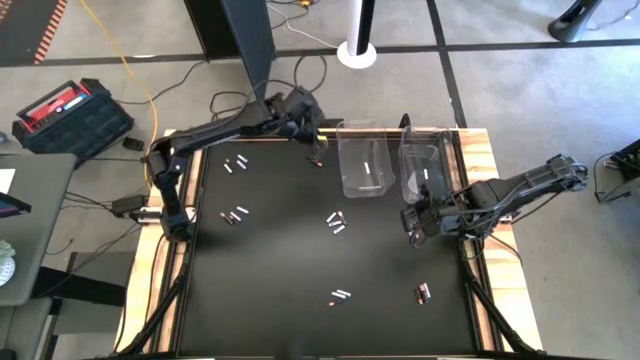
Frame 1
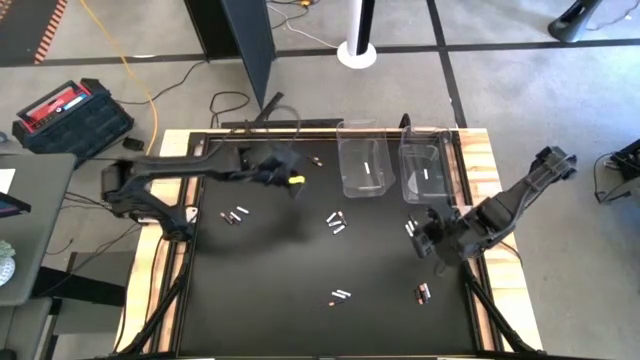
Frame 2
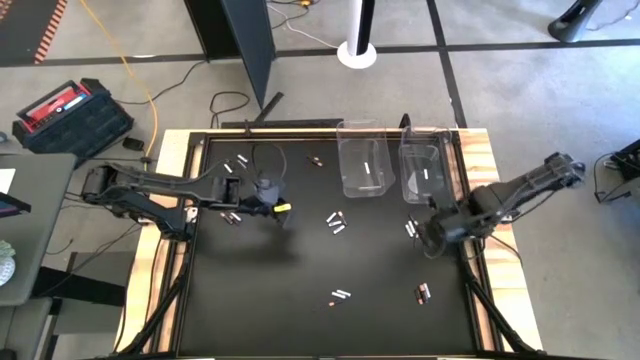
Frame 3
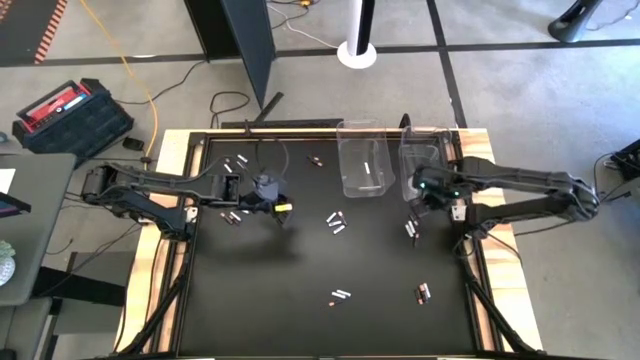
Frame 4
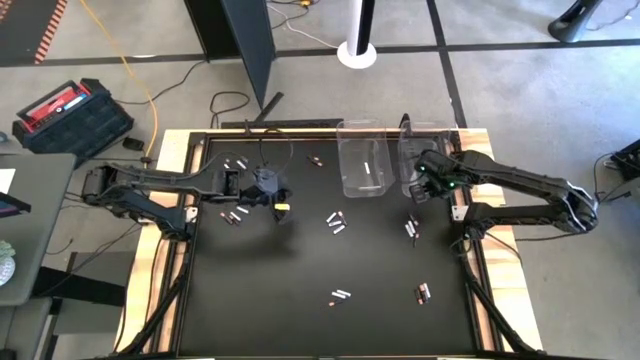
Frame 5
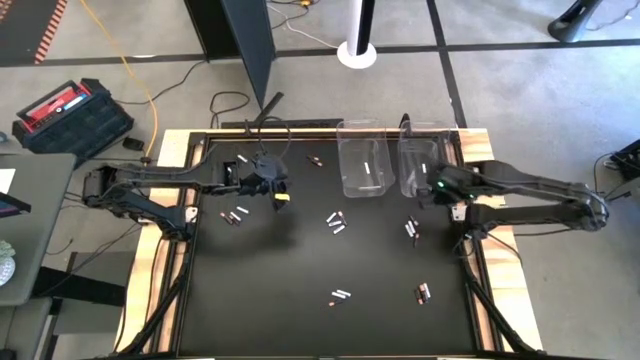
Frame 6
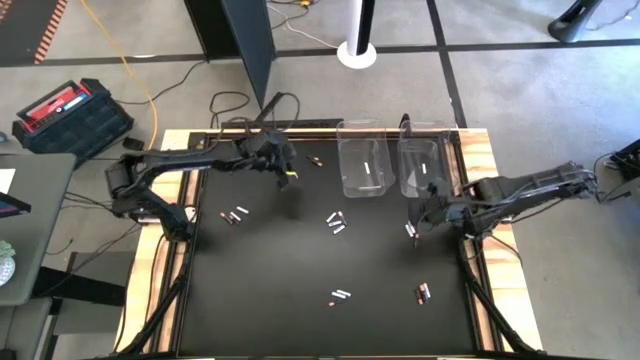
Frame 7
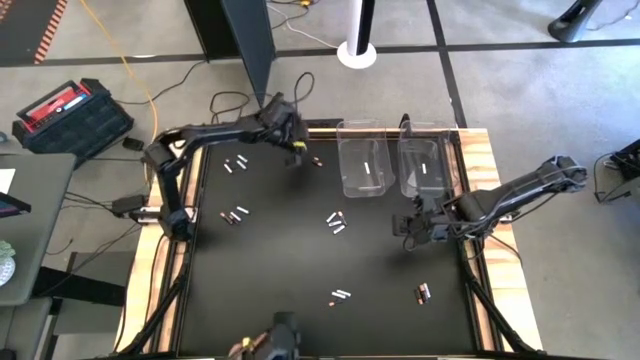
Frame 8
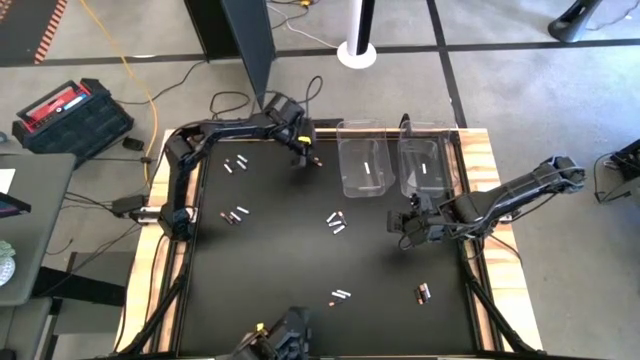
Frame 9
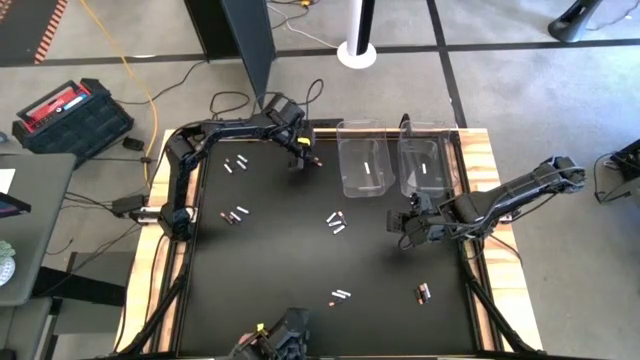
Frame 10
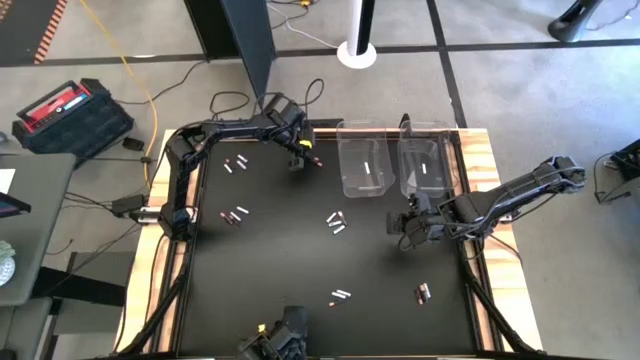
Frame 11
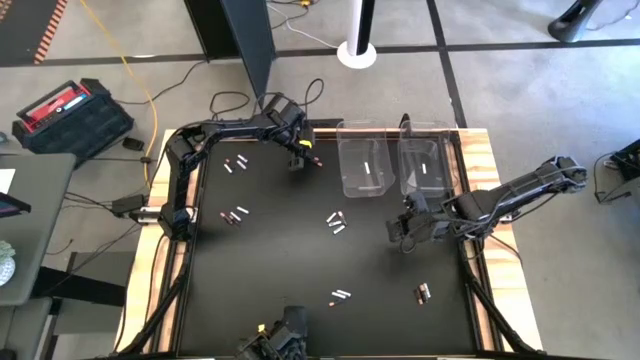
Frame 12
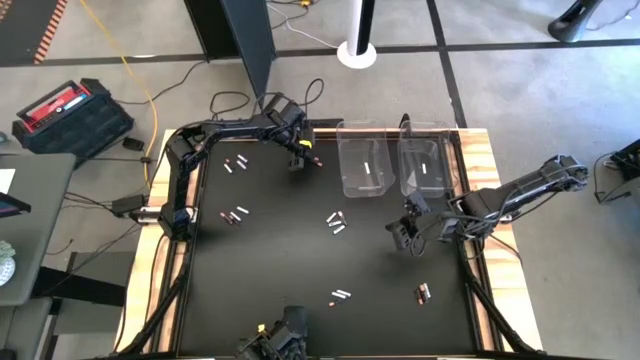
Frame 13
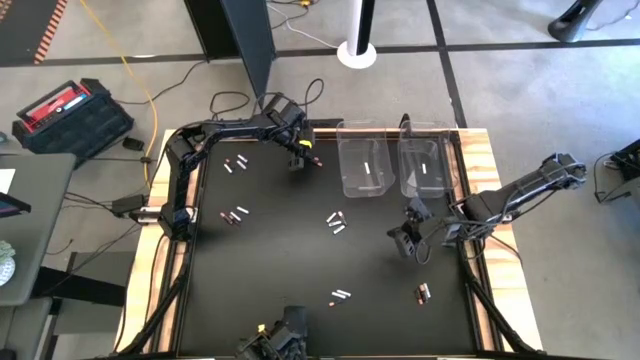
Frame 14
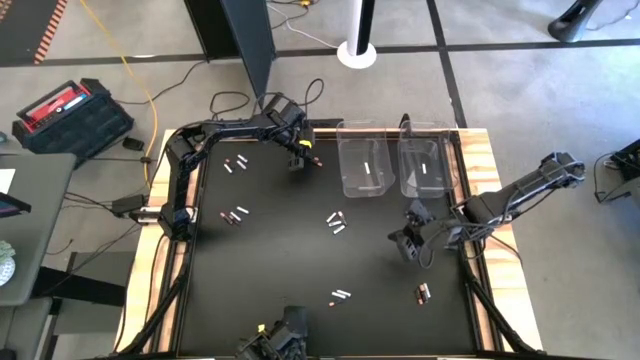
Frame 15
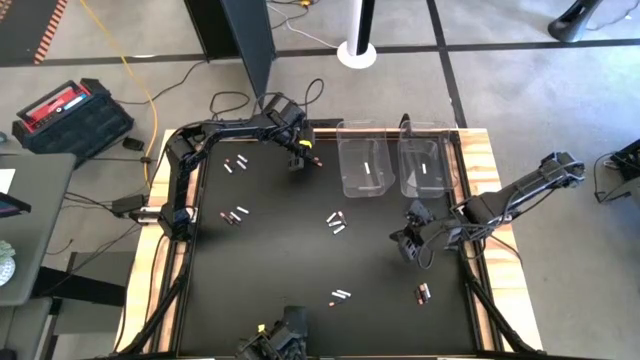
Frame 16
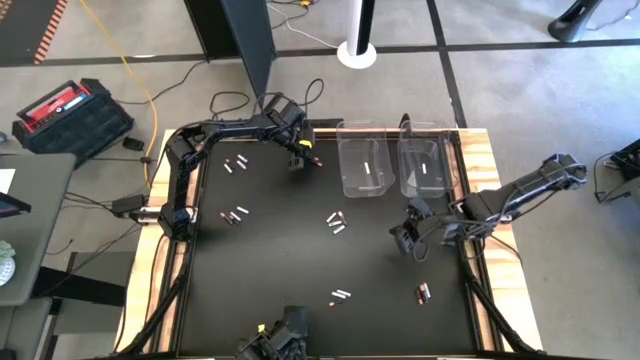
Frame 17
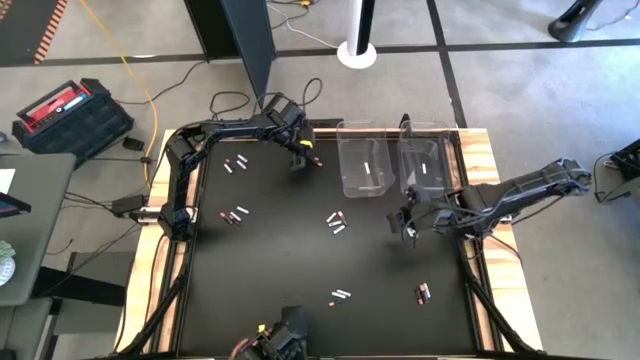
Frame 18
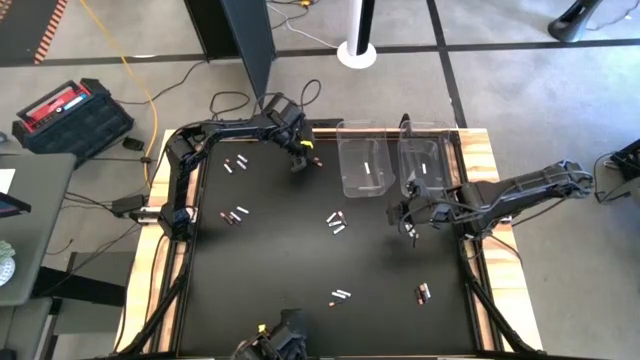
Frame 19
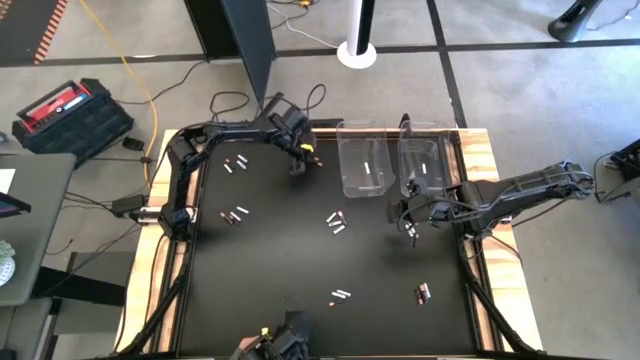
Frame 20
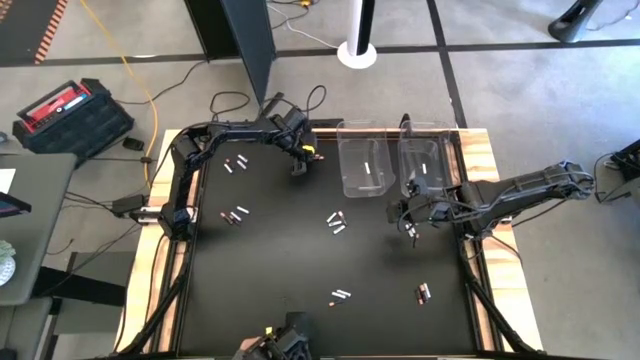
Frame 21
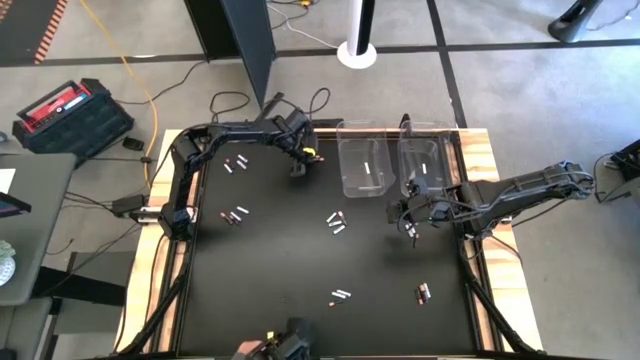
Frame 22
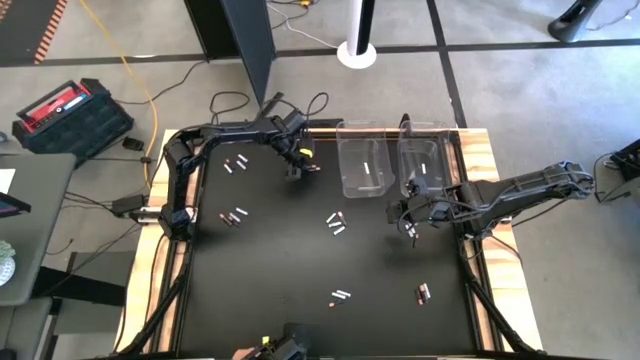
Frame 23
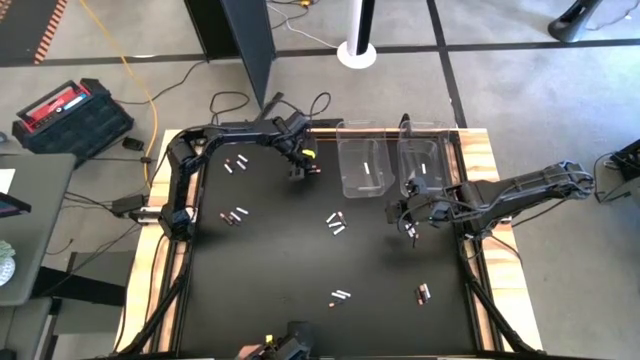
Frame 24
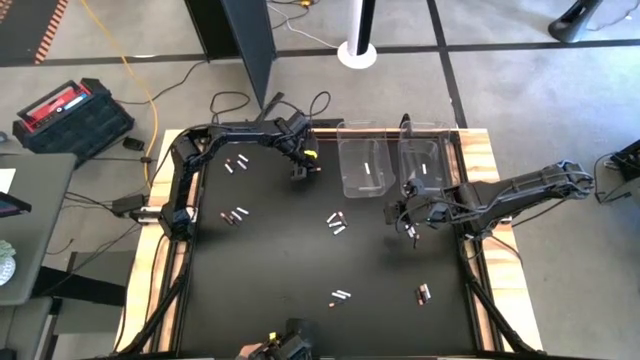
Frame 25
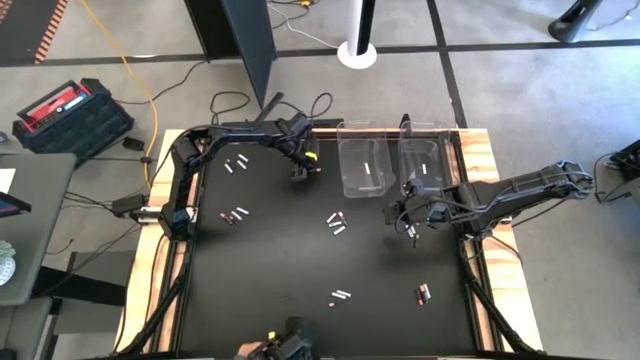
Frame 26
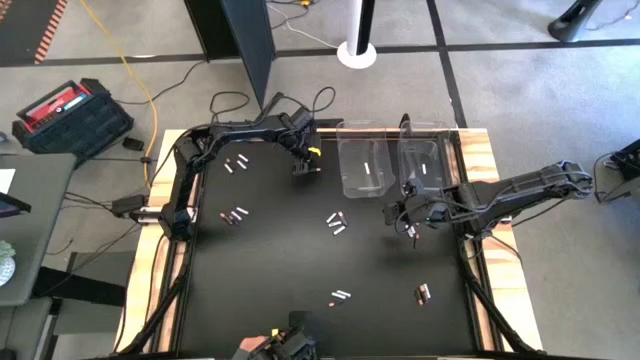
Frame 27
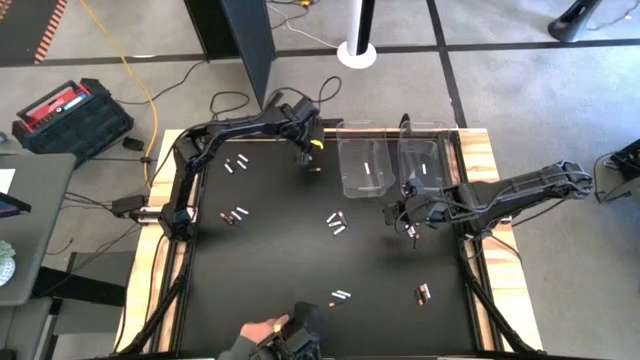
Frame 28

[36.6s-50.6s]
Task: Sort batteries
Move the left transparent bin beside the right transparent bin

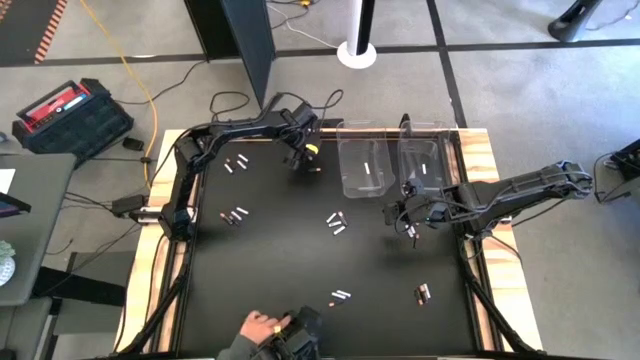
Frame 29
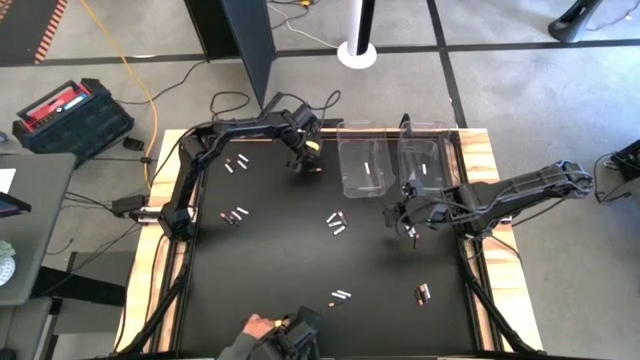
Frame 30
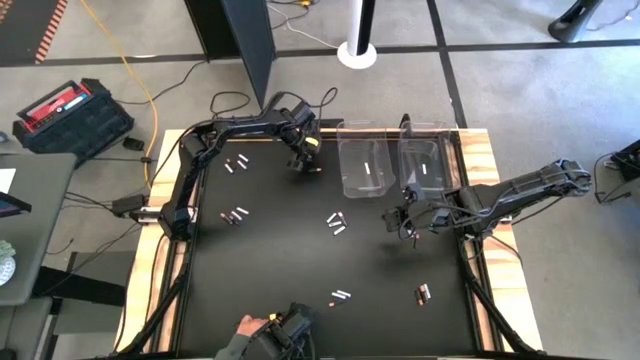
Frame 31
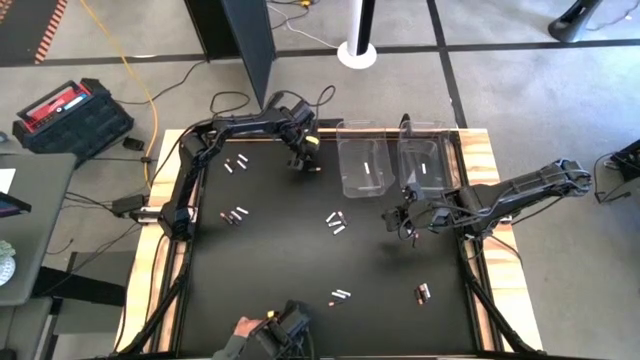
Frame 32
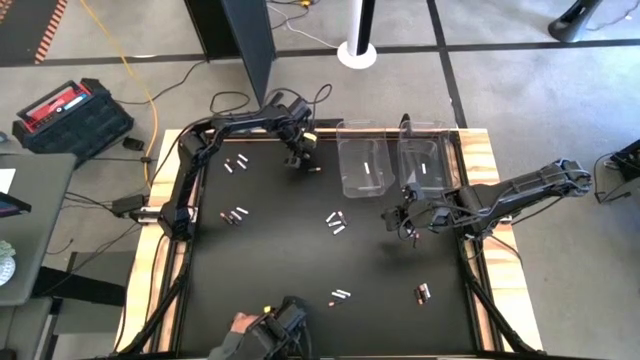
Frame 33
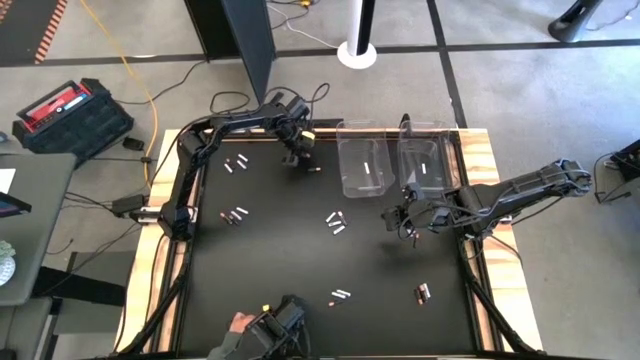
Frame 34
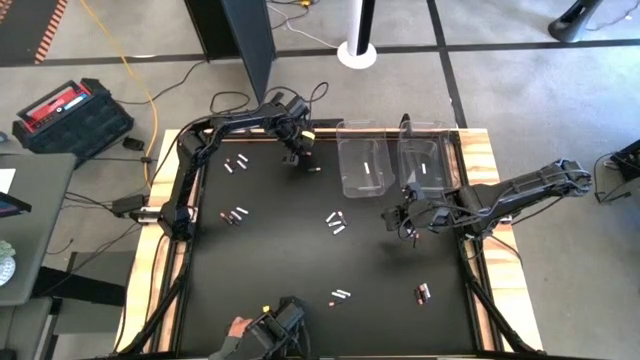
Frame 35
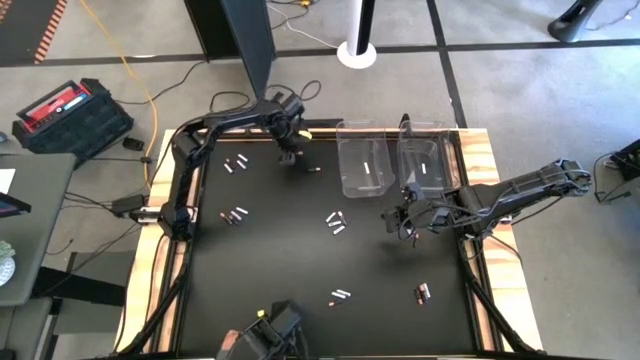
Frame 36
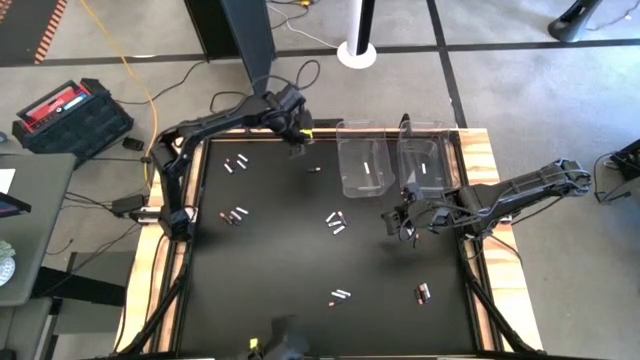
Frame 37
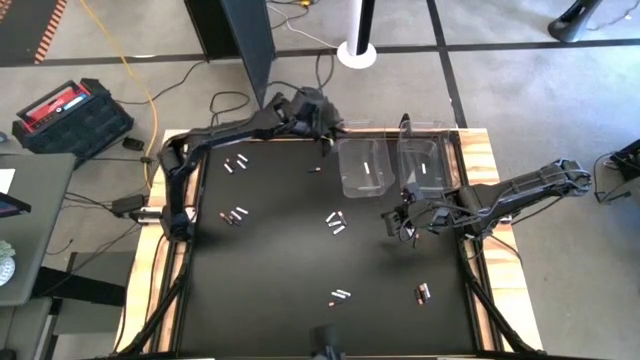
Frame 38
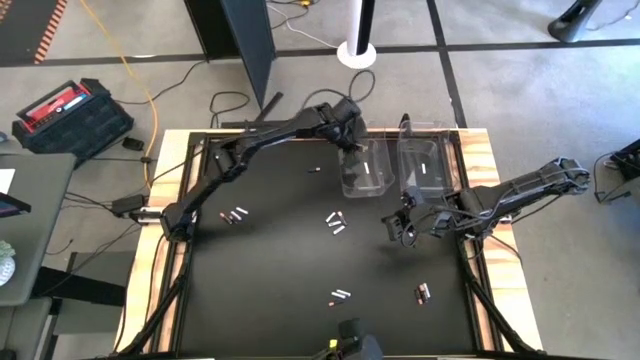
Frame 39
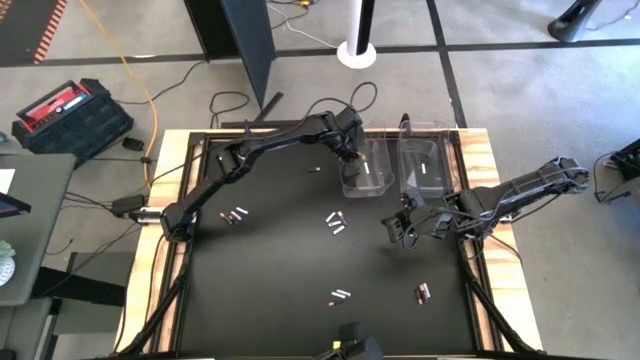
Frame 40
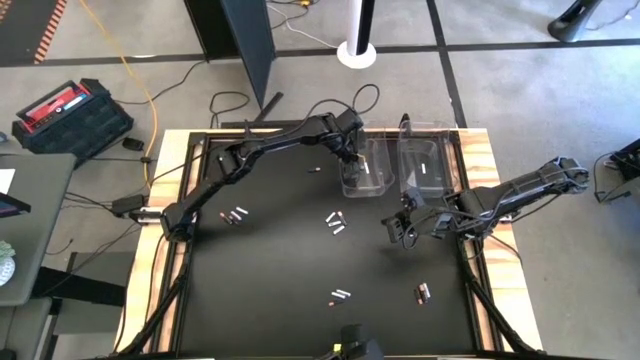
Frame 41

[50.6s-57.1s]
Put the black battery into the left transparent bin

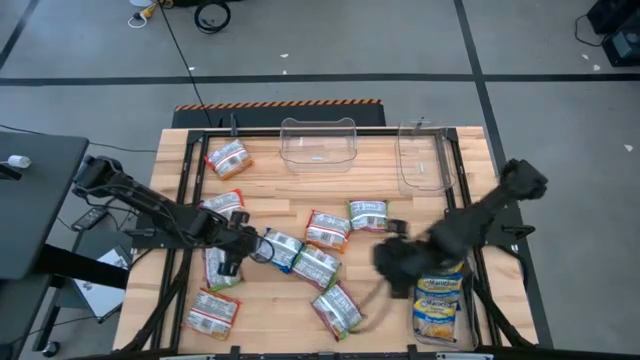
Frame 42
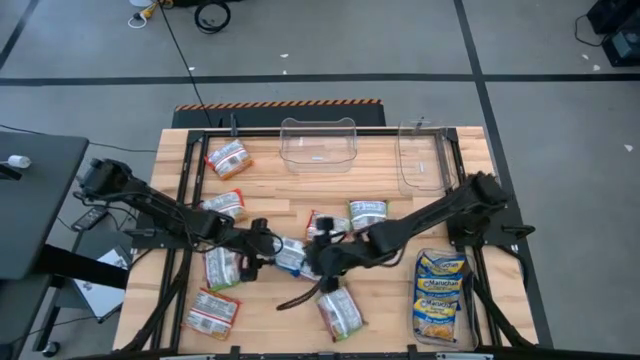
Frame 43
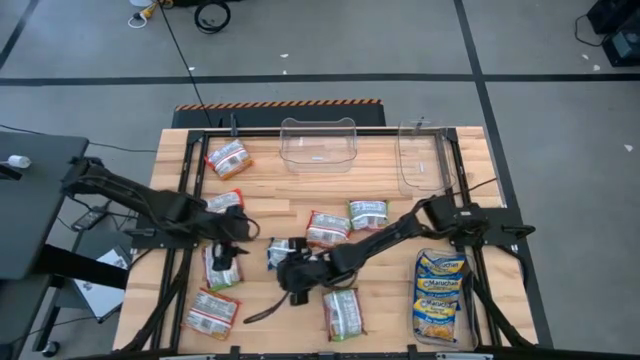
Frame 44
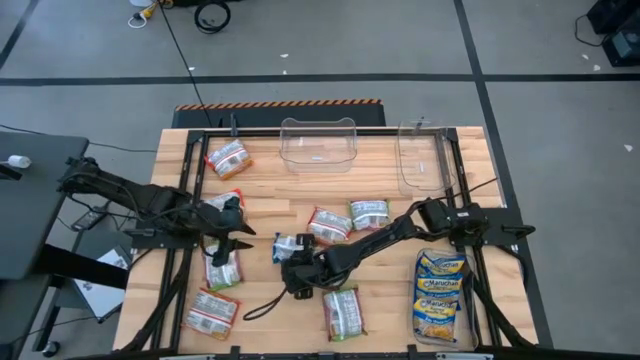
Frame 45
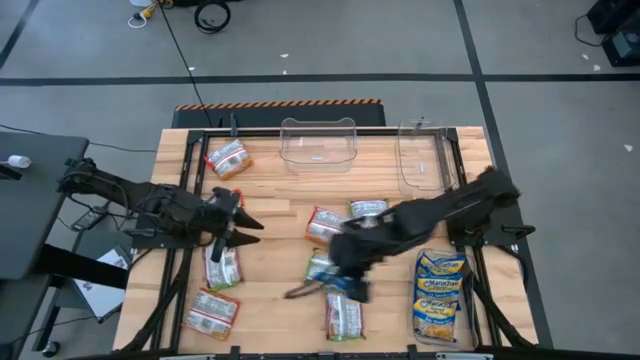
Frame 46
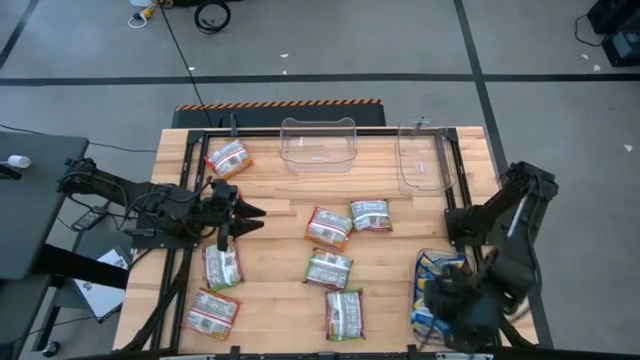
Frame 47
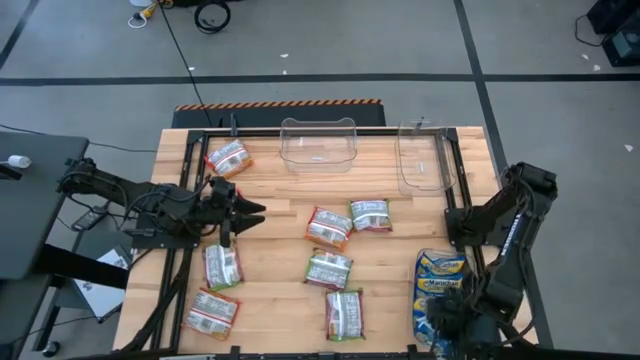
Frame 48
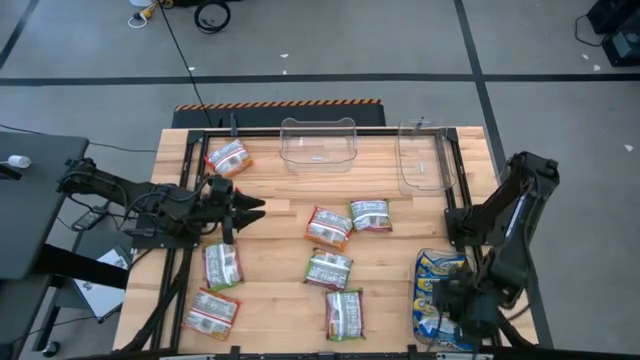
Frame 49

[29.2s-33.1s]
Task: Sort Maruchan noodles
Put the blue noodle pack into the bottom transparent bin
